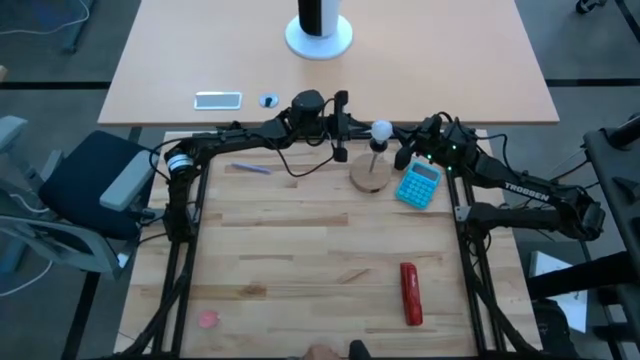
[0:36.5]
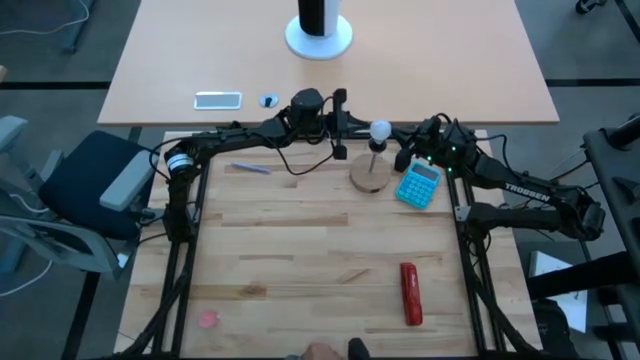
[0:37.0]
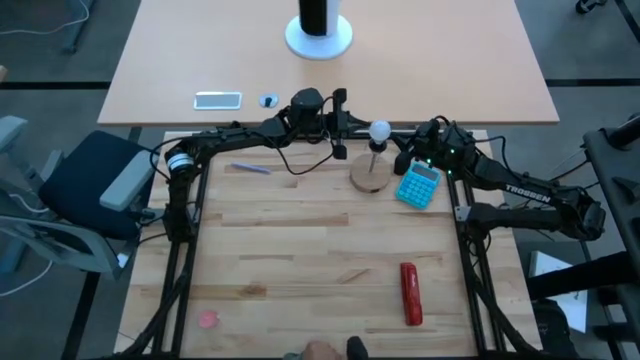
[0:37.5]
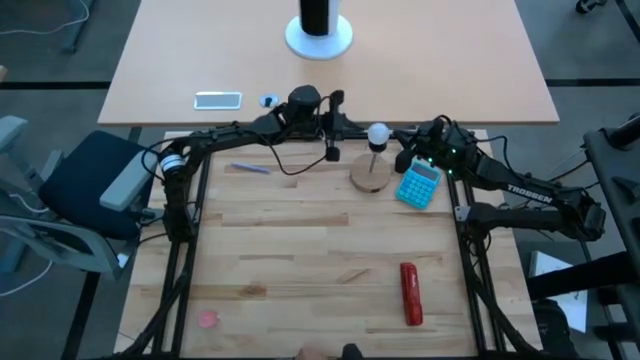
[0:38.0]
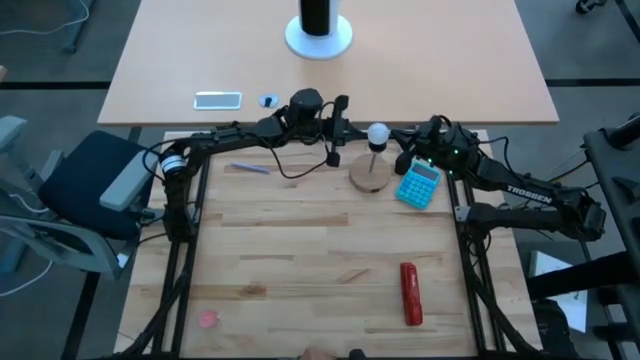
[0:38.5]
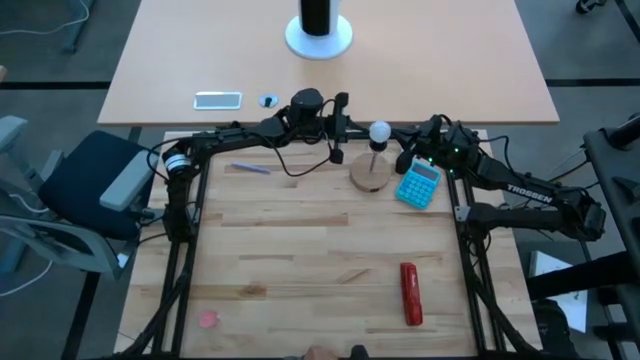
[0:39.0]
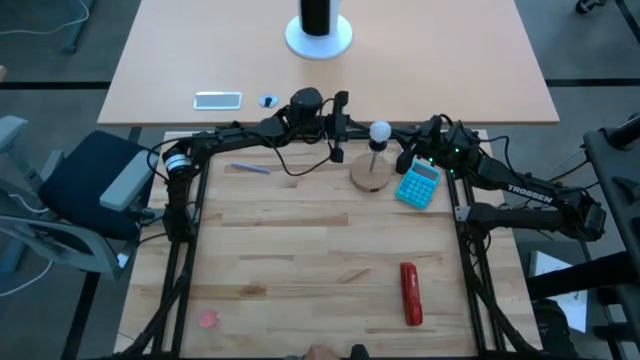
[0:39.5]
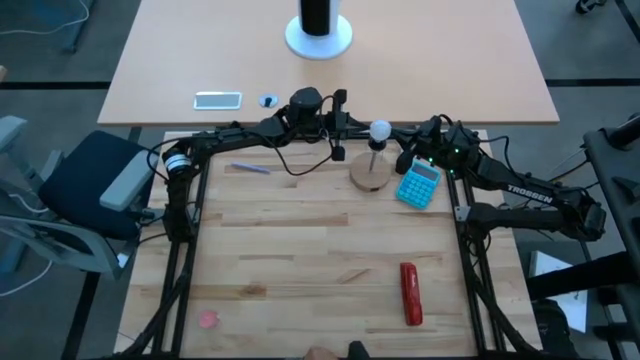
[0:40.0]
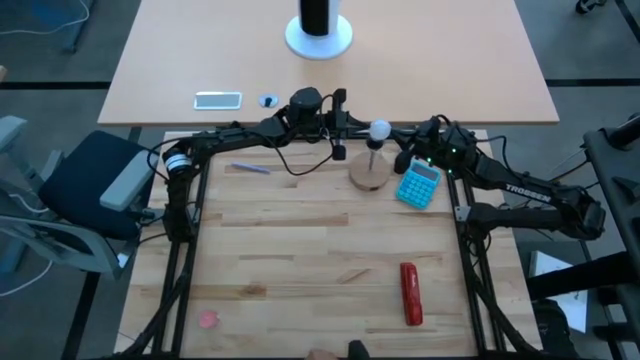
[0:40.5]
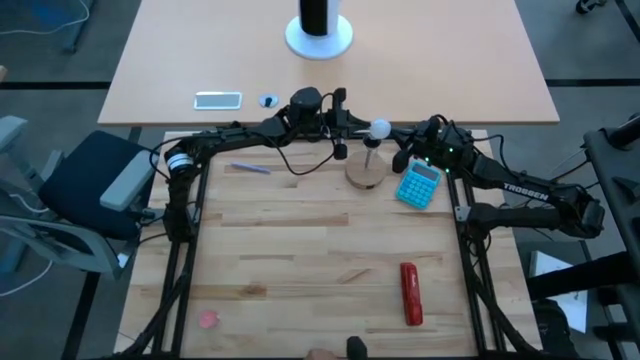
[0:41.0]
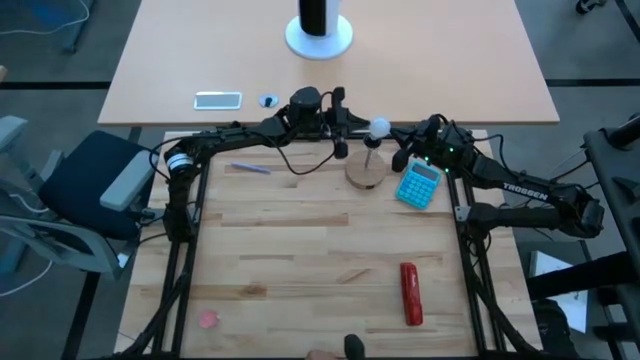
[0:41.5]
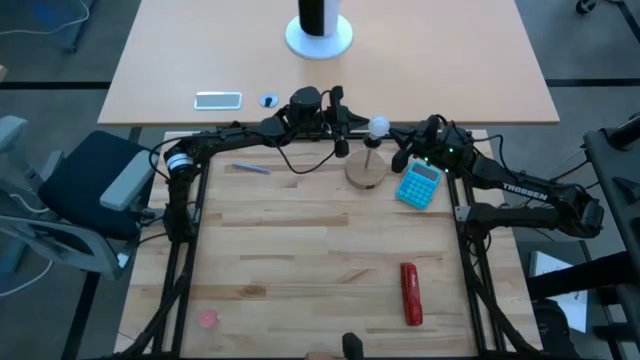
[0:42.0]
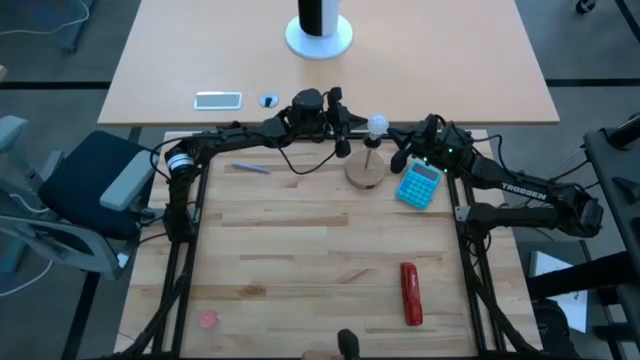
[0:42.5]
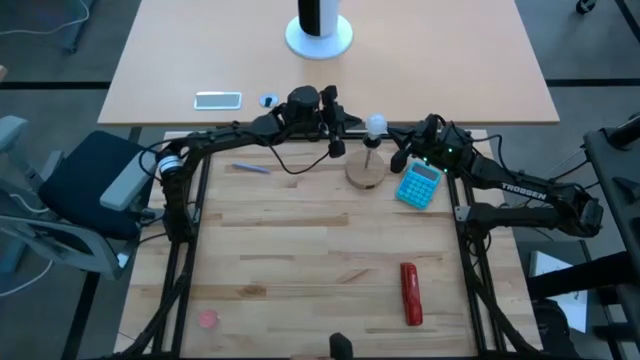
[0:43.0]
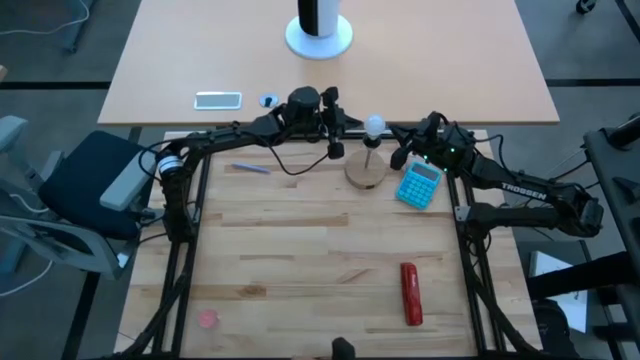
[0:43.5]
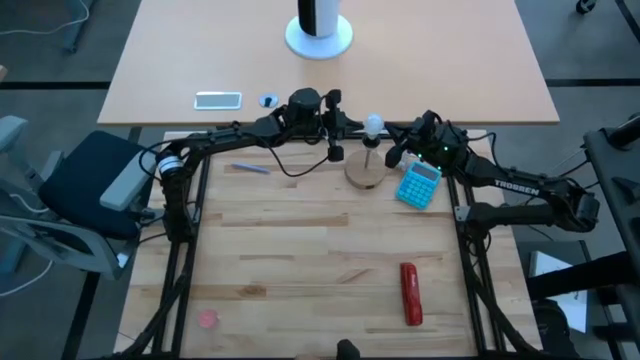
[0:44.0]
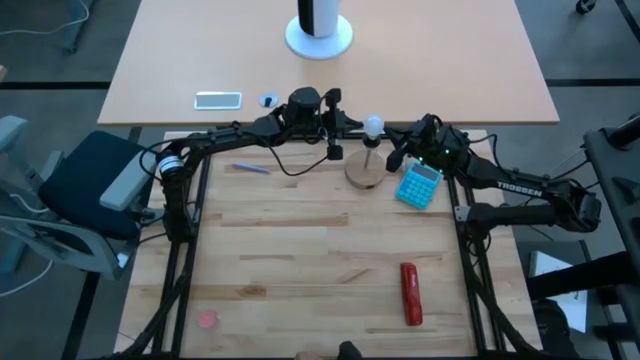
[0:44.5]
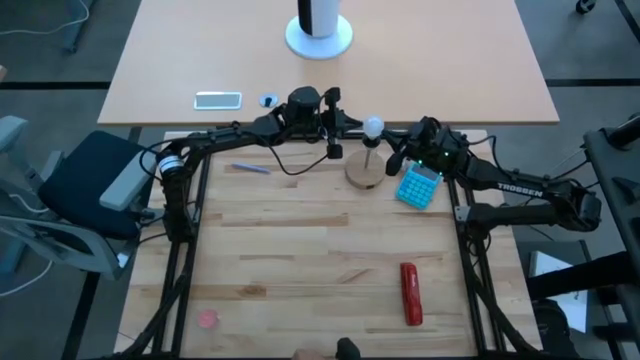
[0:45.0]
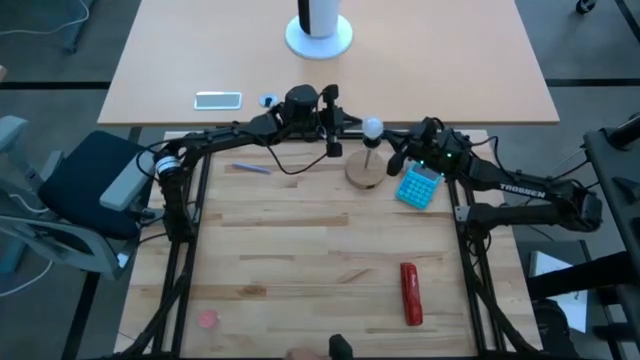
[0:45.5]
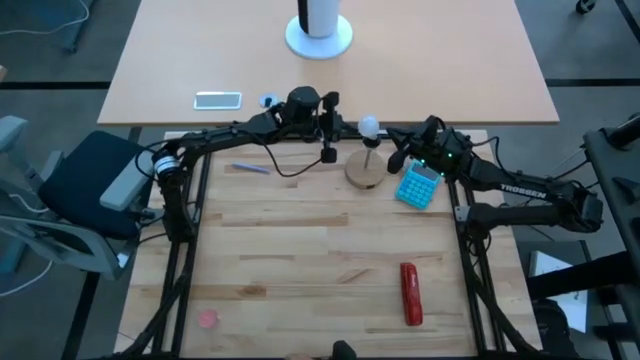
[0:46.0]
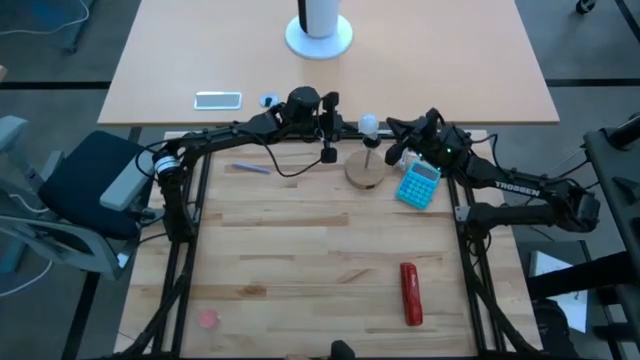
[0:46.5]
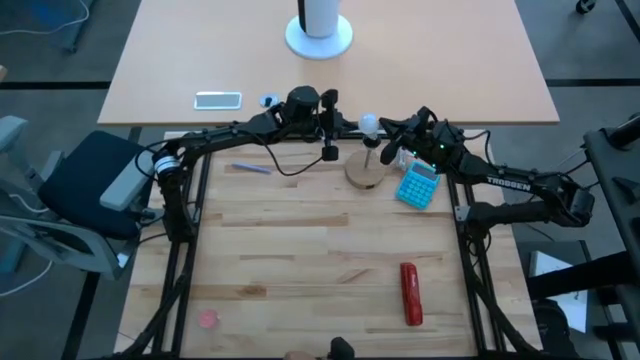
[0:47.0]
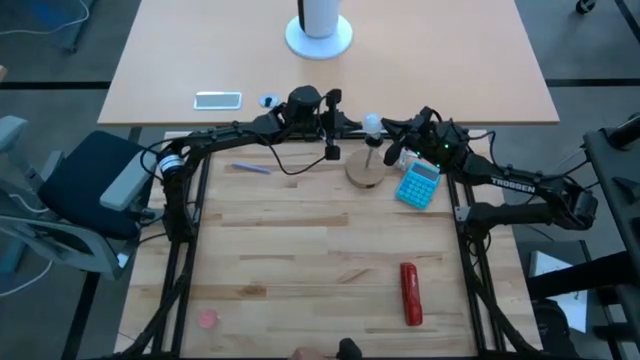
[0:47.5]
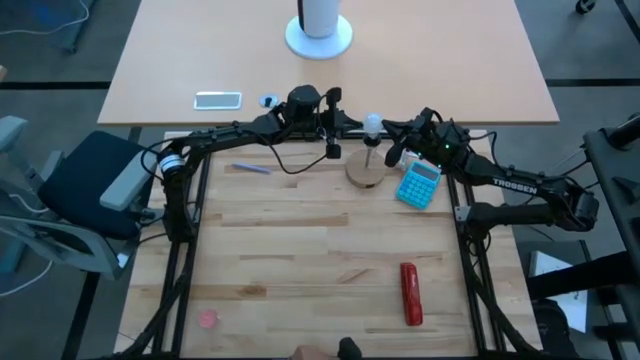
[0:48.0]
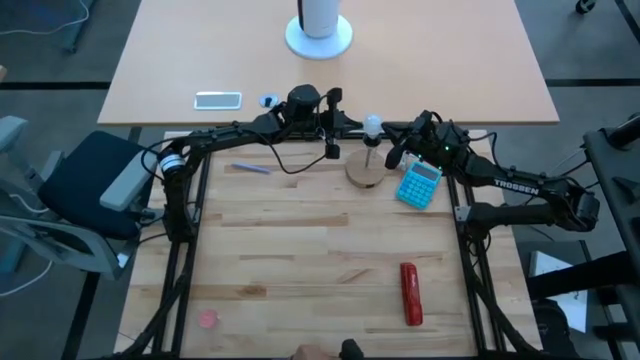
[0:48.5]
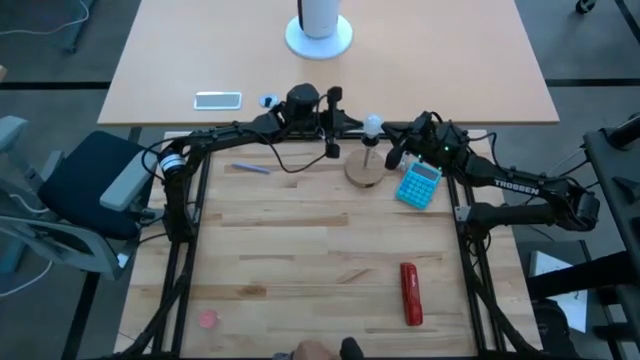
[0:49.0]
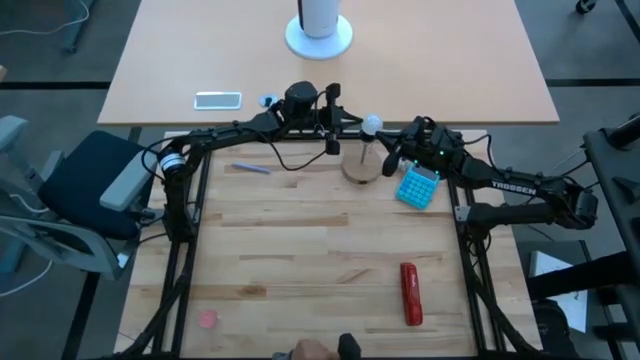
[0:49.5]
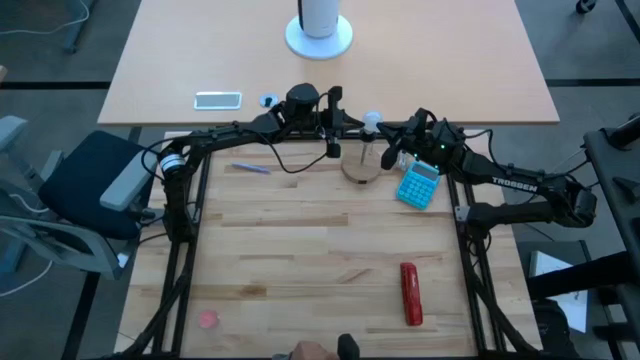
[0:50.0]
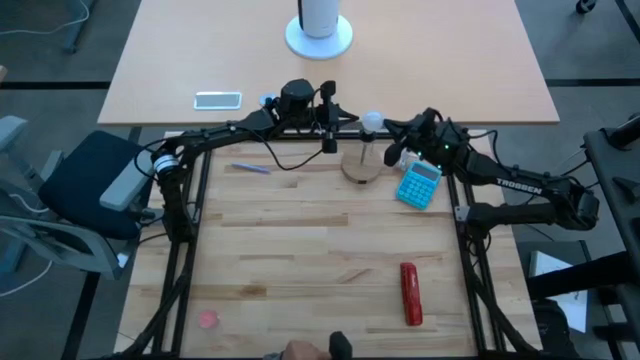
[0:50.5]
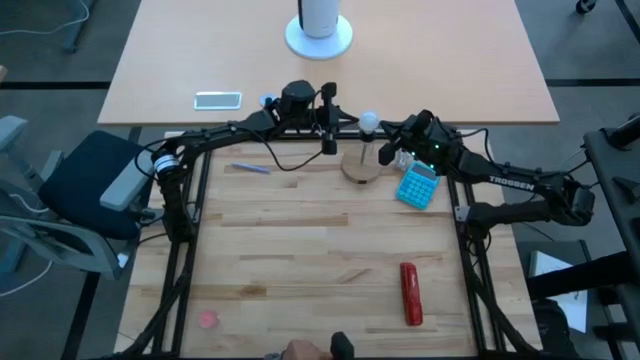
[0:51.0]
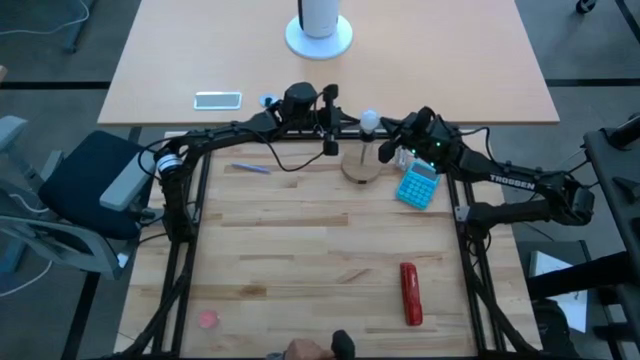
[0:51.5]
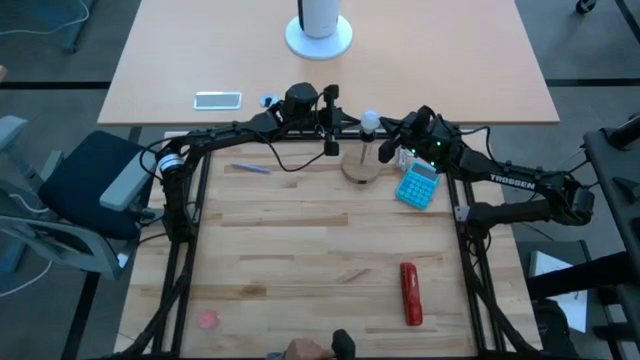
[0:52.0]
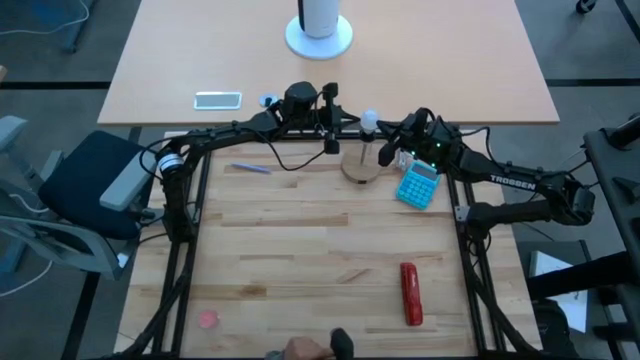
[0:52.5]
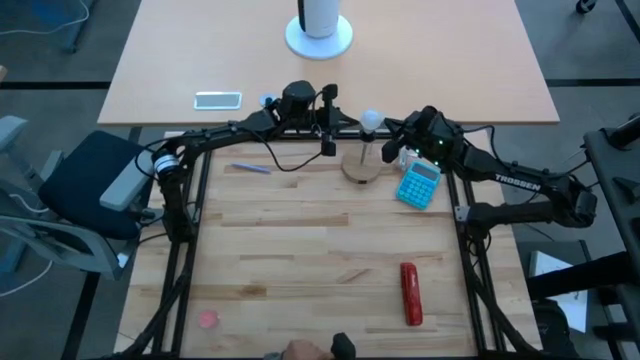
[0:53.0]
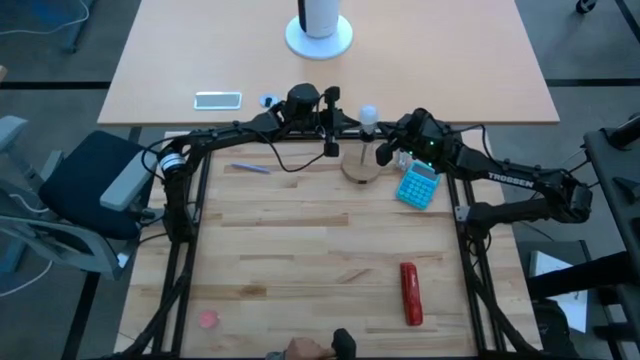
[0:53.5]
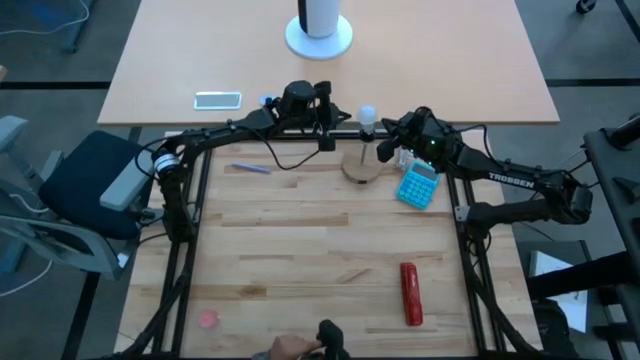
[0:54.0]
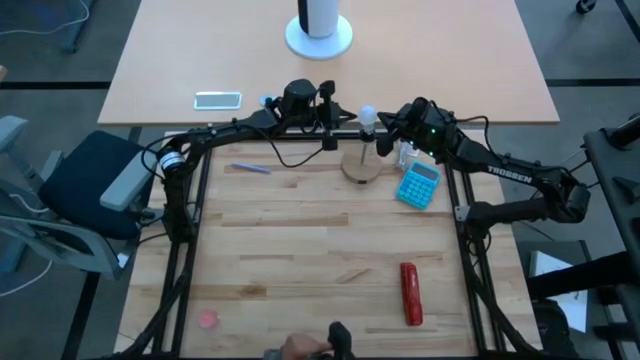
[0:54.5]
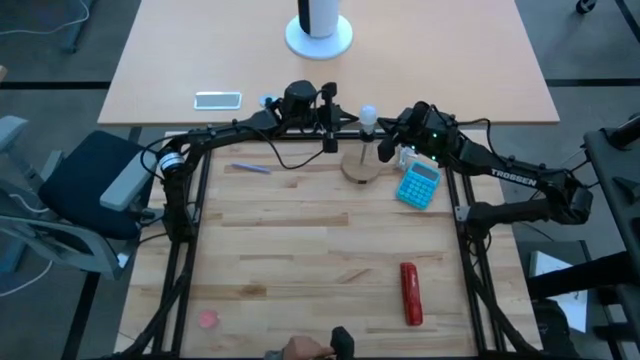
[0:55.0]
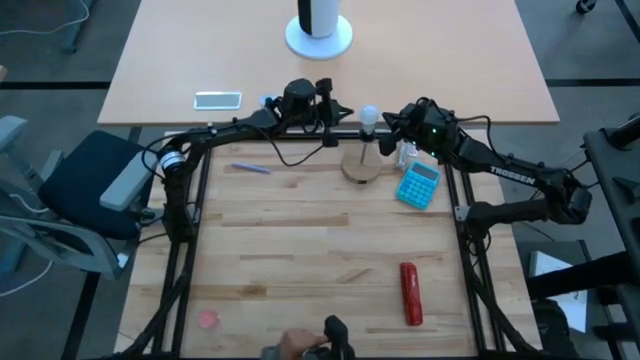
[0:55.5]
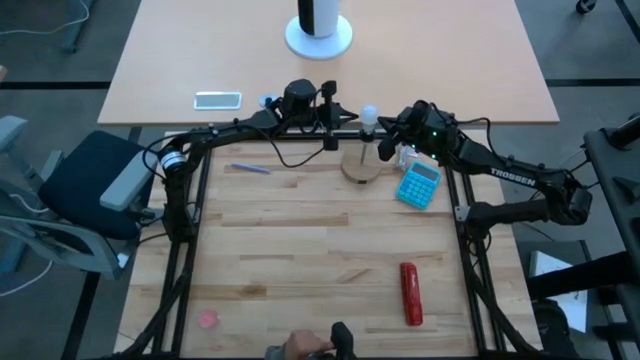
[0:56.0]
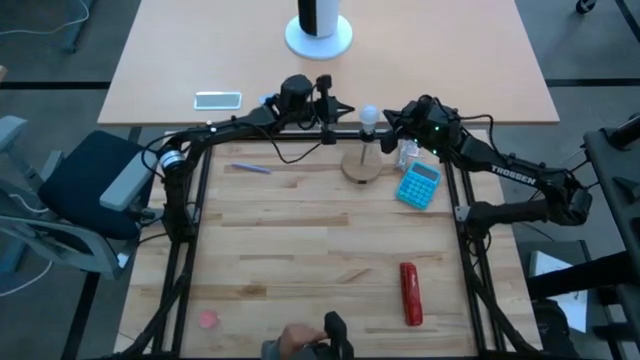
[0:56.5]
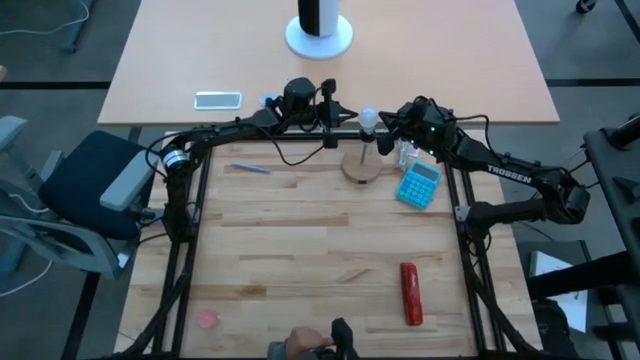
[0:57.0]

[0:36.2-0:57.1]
Task: Screw lightbulb
Insert the lightbulb into the lamp
